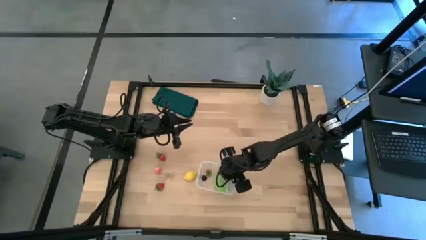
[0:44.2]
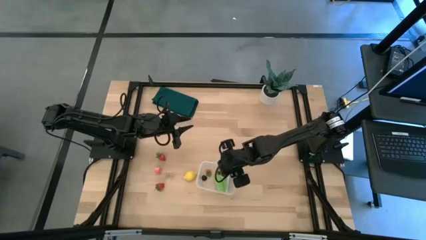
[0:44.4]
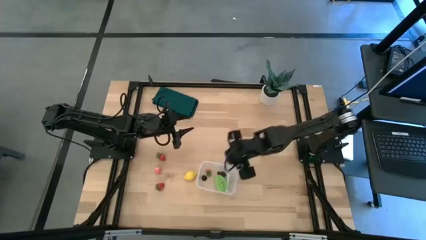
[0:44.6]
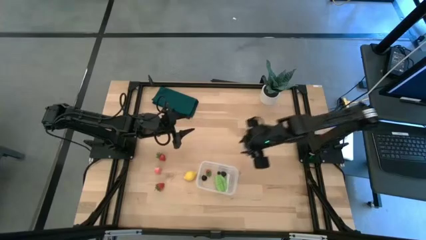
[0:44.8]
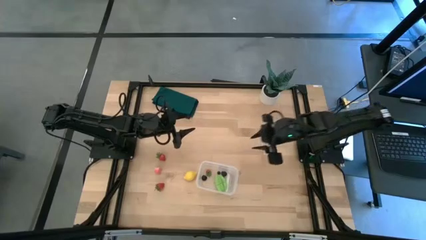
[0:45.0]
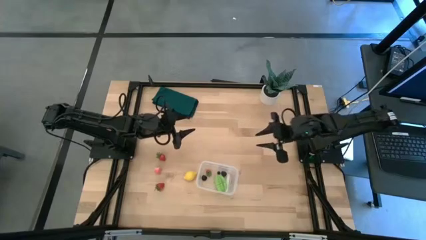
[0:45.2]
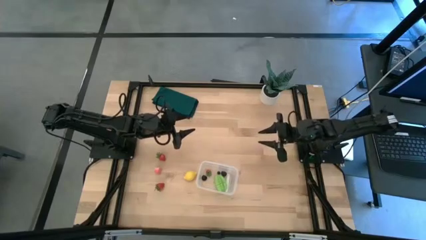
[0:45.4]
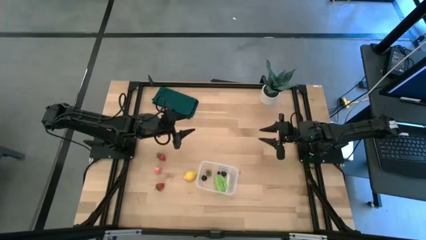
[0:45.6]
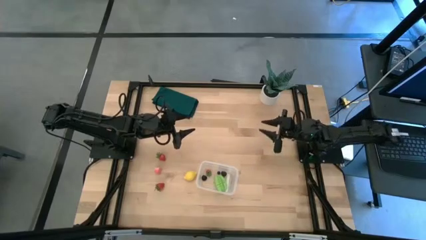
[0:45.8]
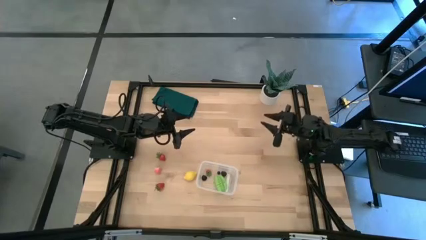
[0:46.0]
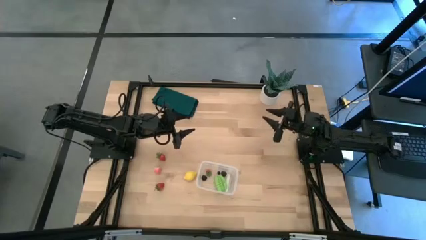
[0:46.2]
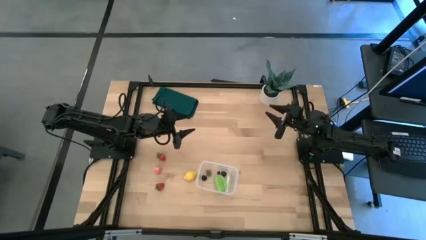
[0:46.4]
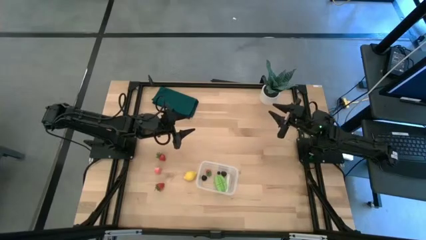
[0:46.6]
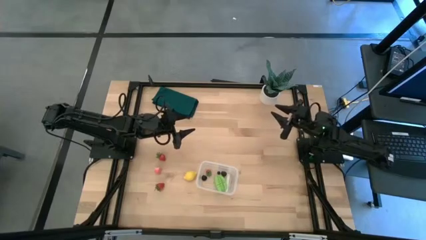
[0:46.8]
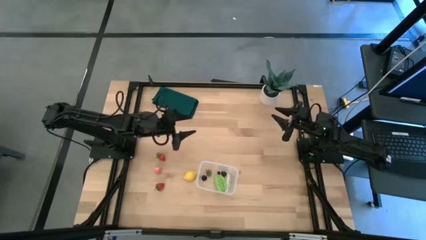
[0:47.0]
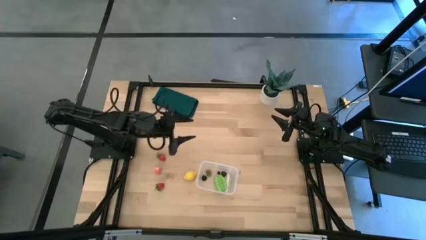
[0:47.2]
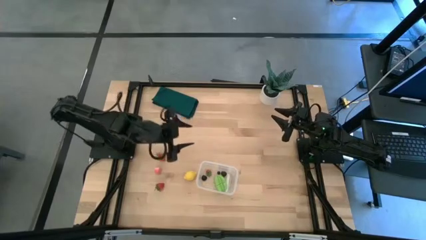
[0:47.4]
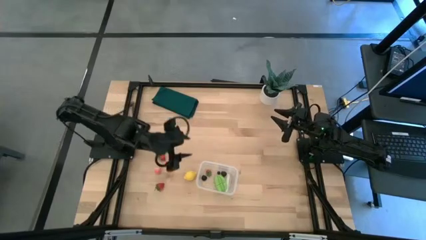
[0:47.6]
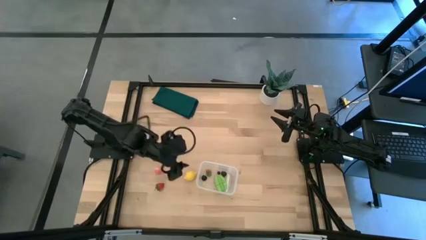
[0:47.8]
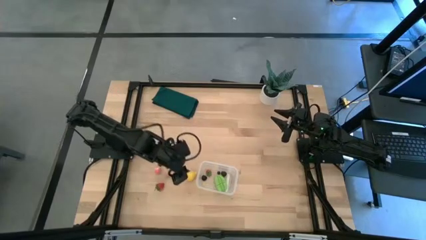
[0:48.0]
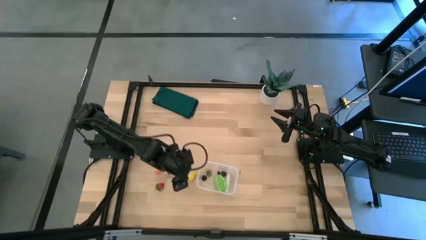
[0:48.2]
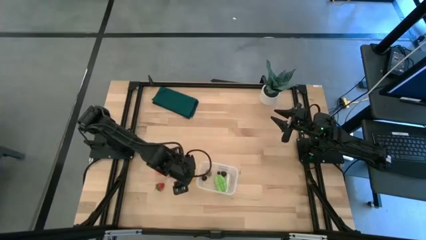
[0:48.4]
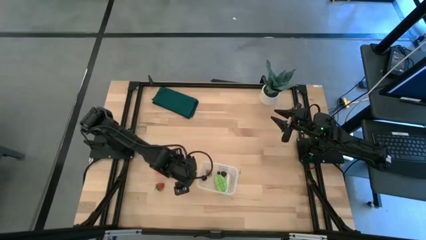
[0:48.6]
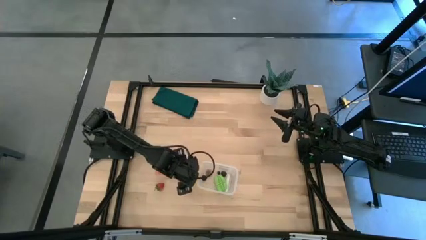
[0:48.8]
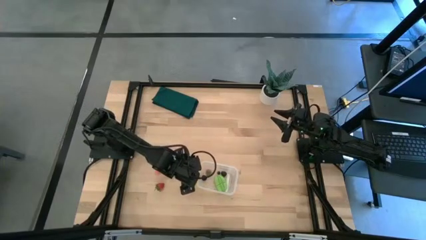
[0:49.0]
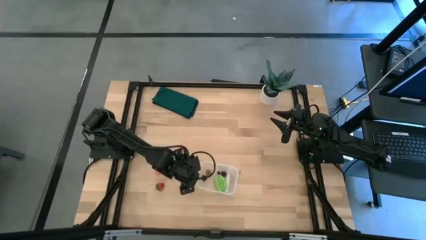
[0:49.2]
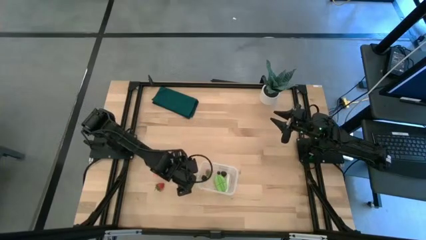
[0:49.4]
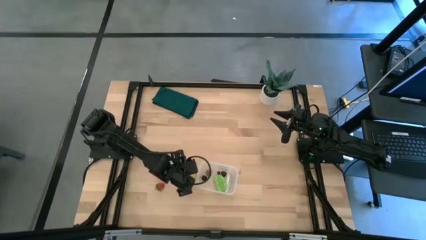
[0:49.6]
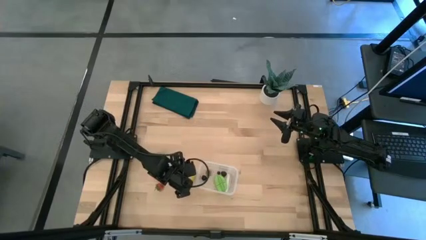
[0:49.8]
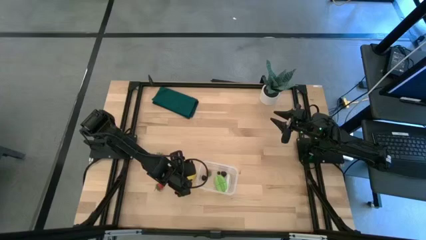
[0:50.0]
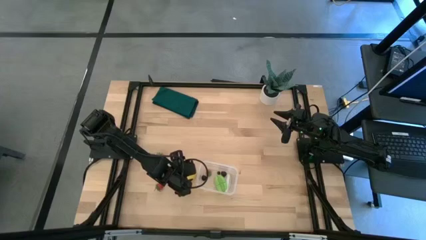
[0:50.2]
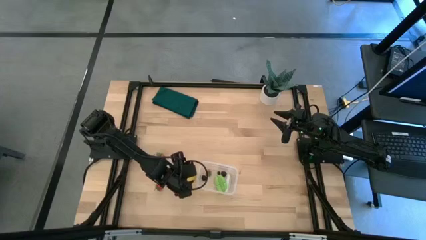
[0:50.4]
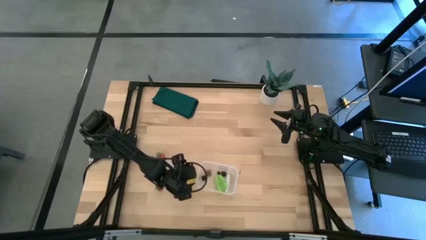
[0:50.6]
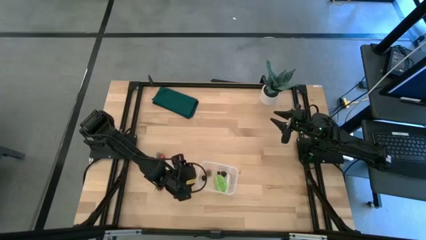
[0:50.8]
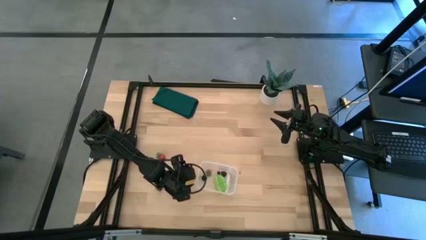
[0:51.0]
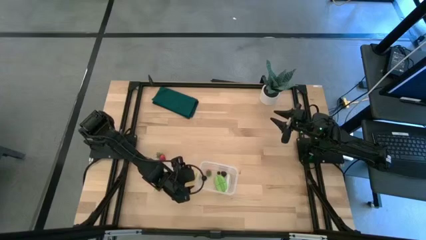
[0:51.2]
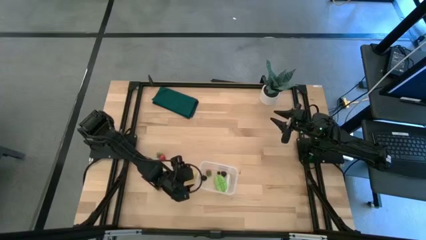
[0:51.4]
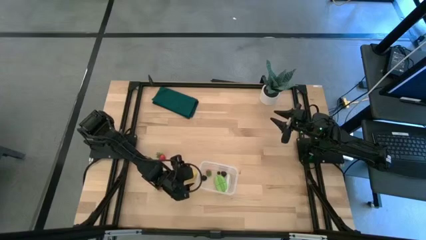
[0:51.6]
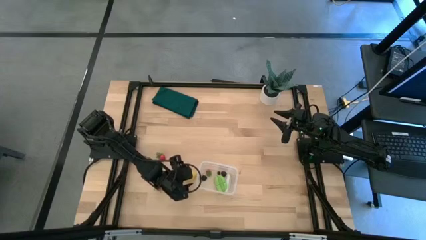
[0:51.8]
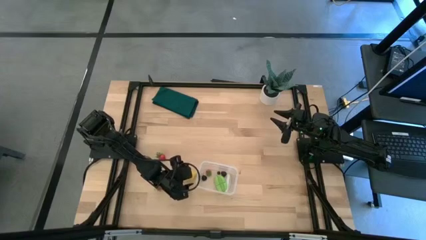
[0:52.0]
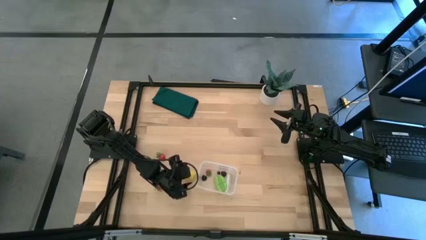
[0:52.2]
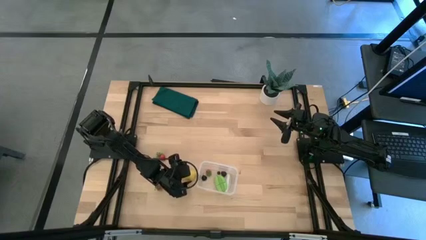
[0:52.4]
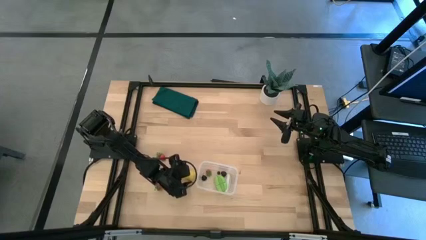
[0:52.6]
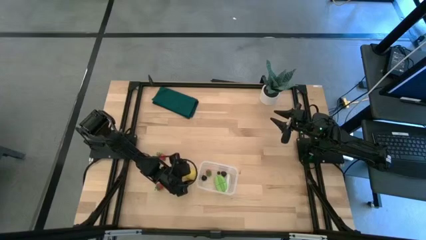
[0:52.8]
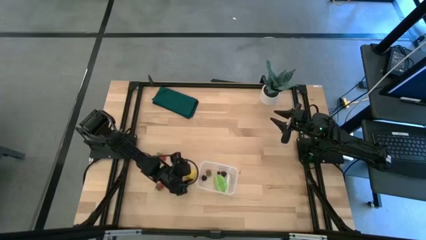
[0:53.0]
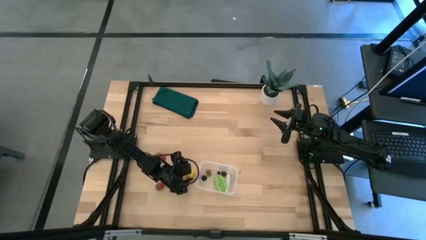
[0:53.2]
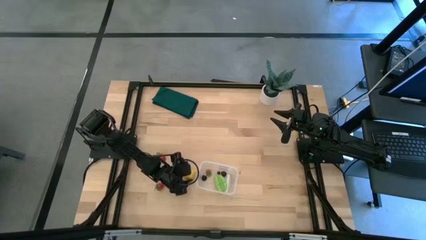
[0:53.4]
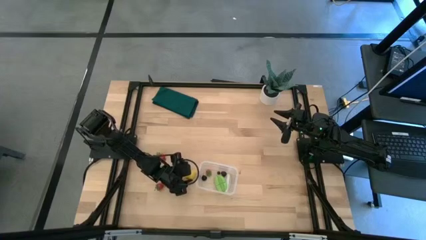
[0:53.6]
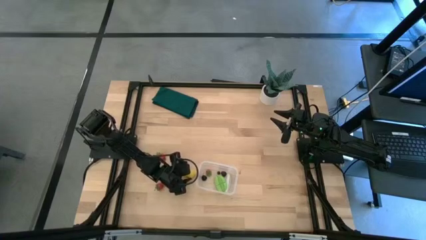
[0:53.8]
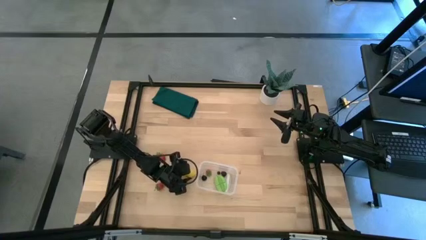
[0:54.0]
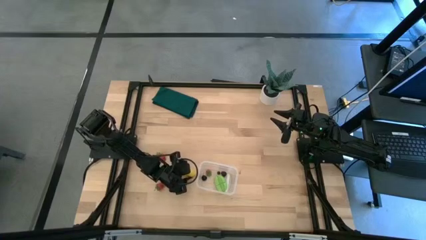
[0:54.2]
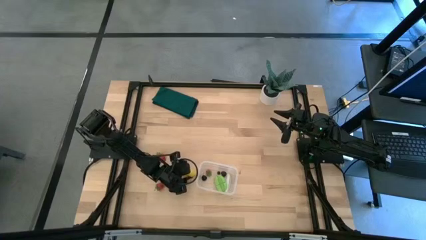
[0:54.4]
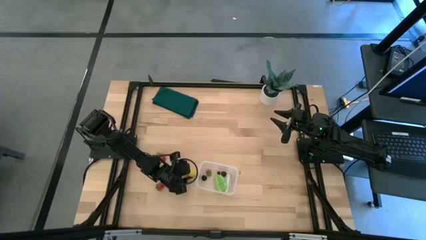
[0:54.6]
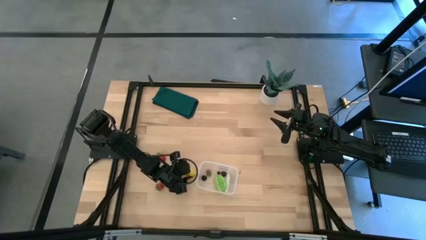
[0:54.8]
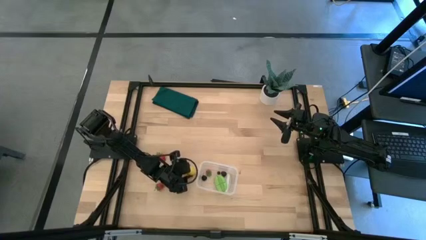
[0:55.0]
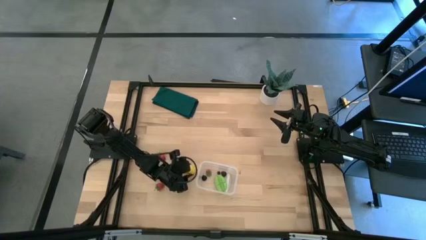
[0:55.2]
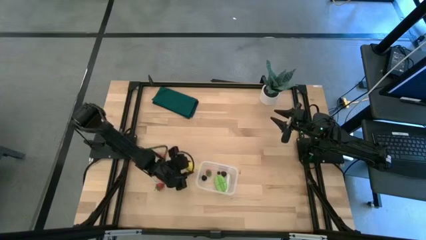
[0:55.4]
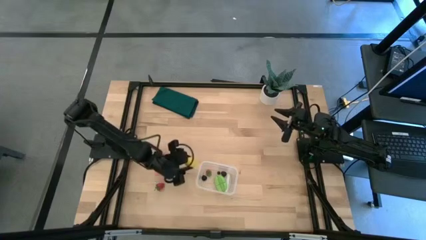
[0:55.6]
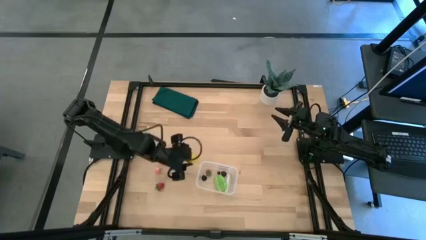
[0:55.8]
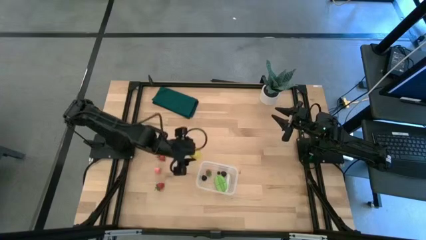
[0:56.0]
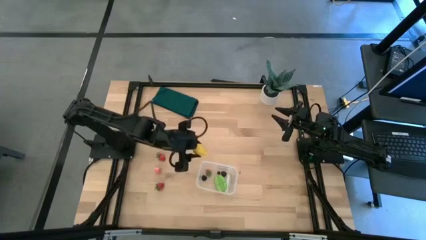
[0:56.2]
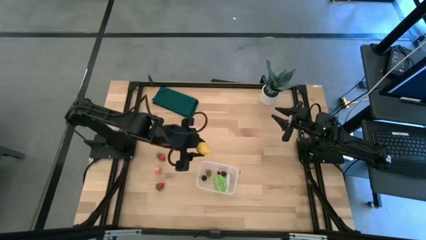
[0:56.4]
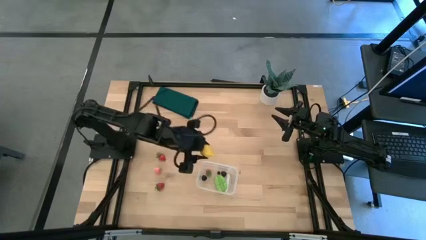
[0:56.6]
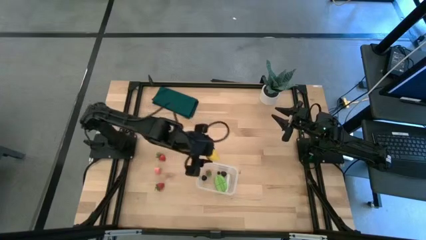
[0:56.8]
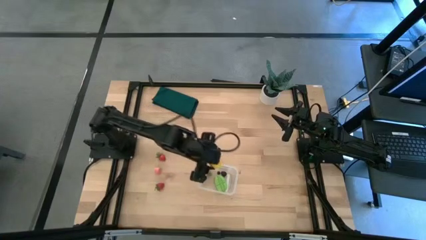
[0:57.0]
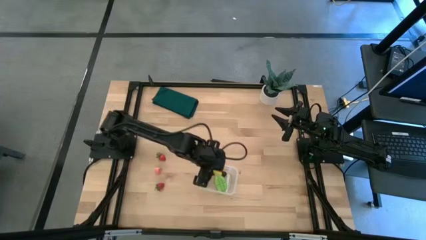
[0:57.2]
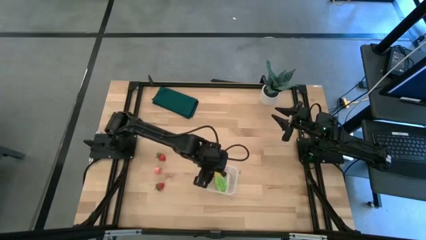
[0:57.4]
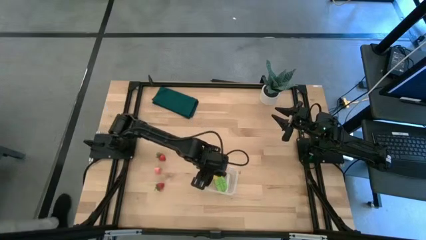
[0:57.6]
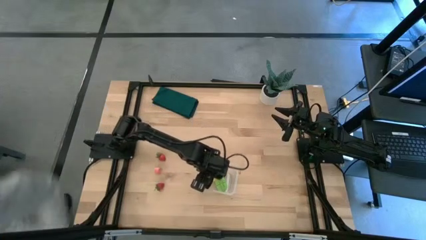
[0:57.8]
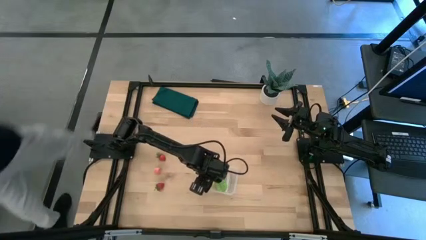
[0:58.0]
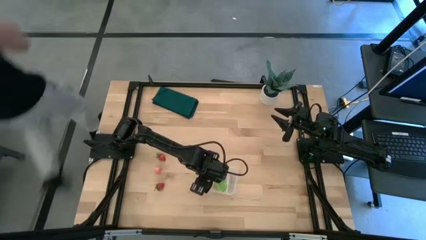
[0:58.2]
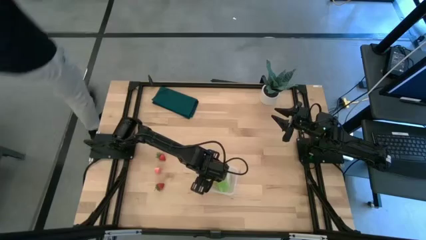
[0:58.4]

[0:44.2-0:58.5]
Task: Pick and placing Produce into tupperware
Put the yellow lemon into the transparent bin
